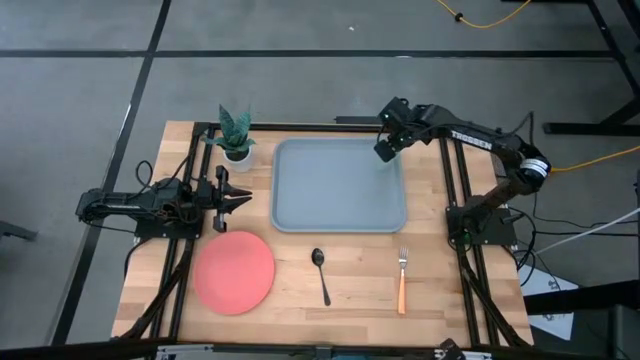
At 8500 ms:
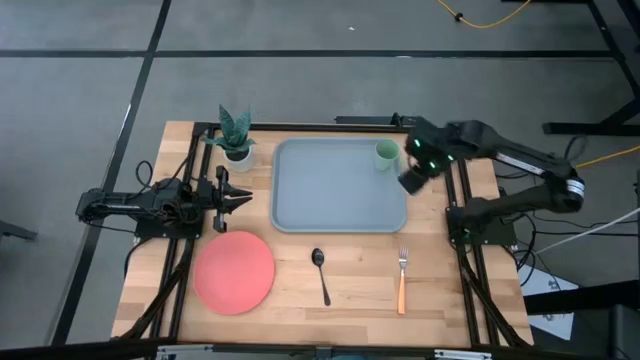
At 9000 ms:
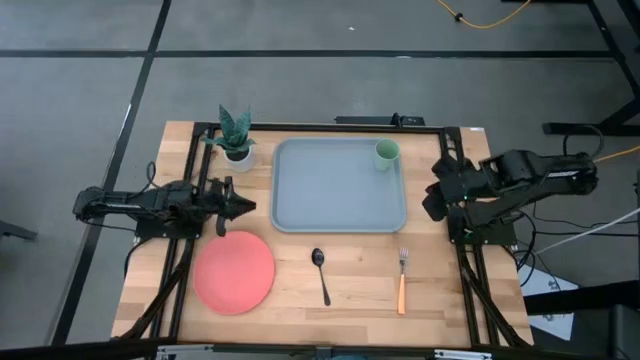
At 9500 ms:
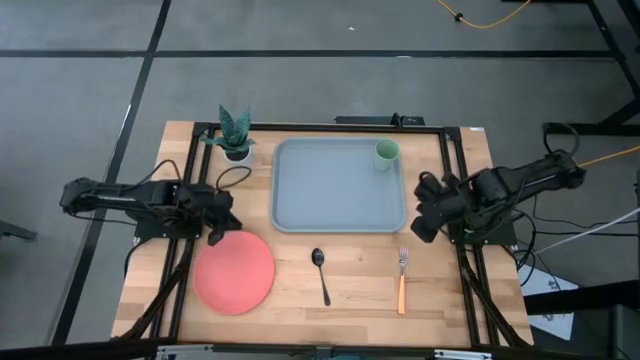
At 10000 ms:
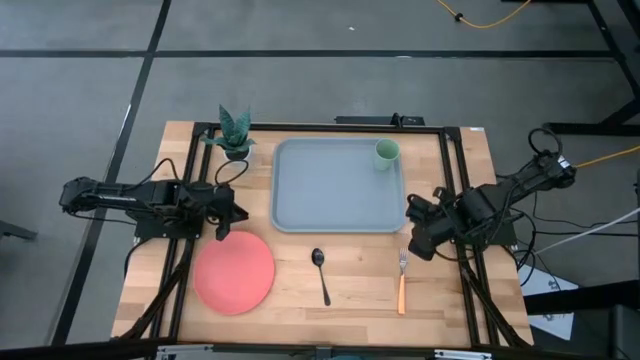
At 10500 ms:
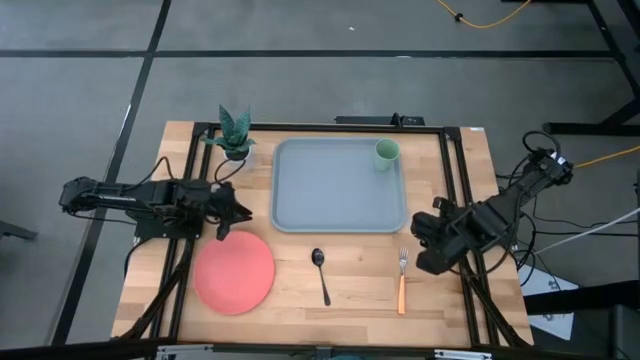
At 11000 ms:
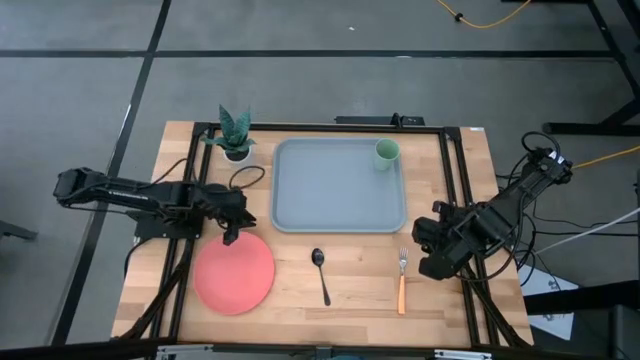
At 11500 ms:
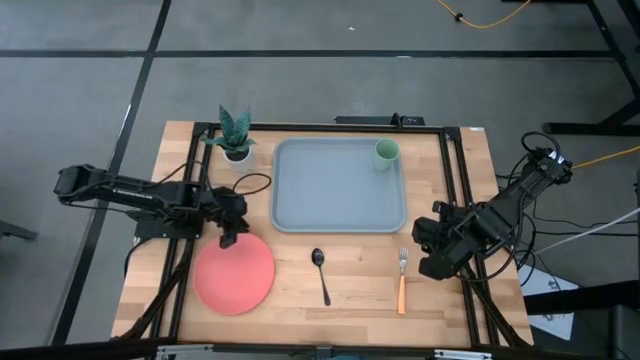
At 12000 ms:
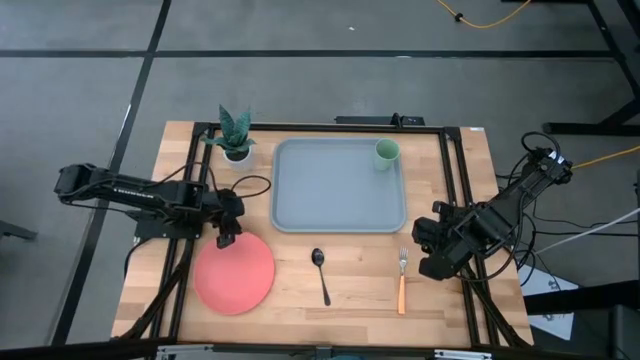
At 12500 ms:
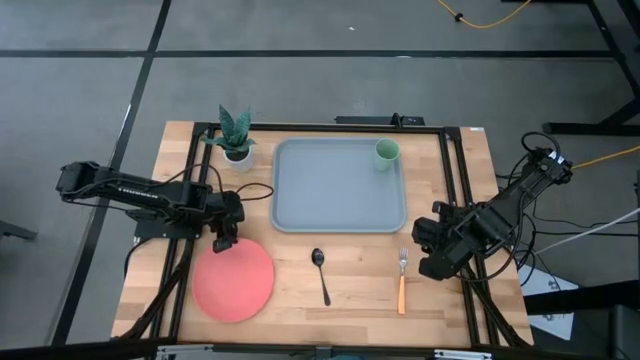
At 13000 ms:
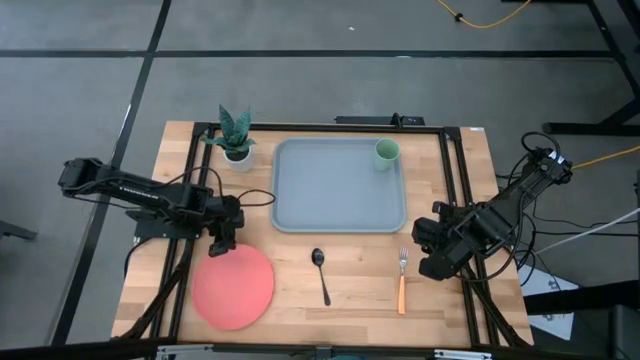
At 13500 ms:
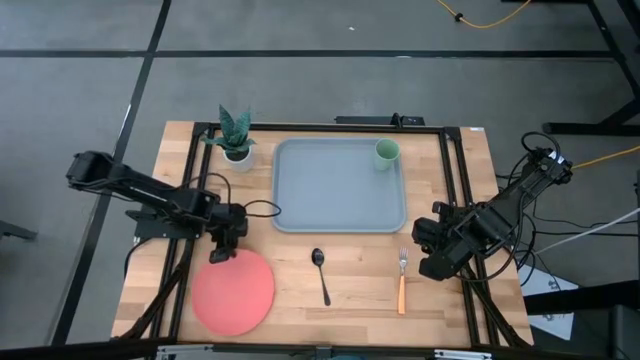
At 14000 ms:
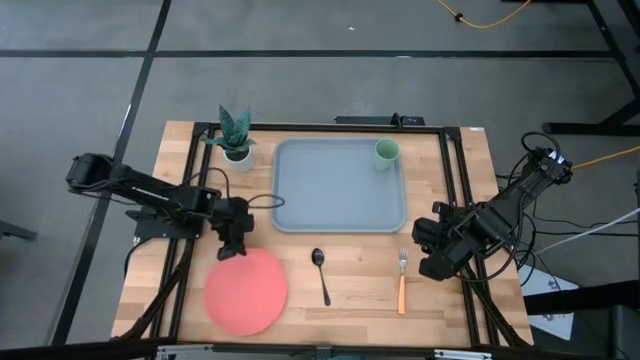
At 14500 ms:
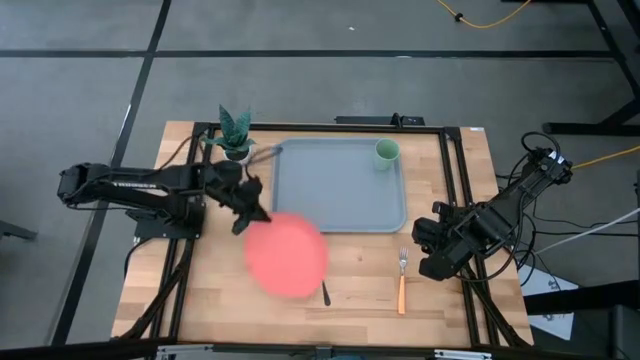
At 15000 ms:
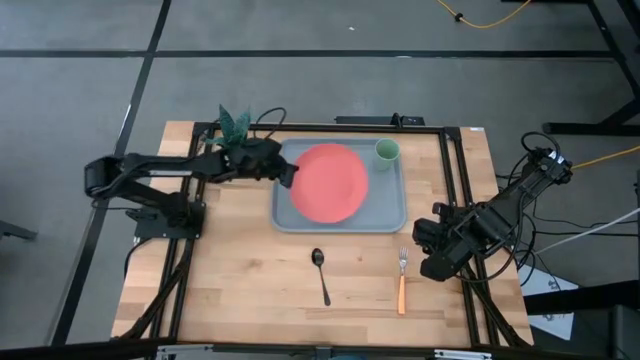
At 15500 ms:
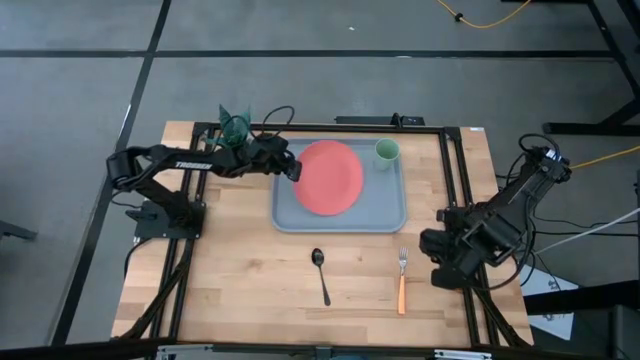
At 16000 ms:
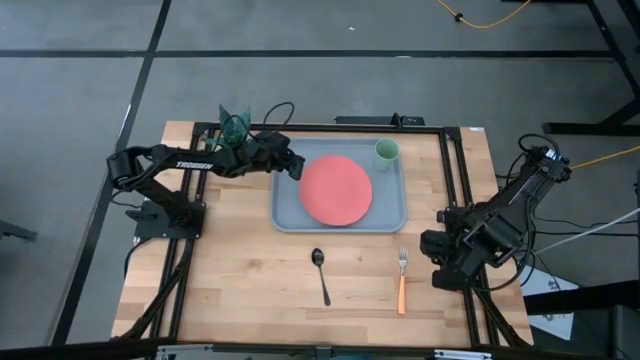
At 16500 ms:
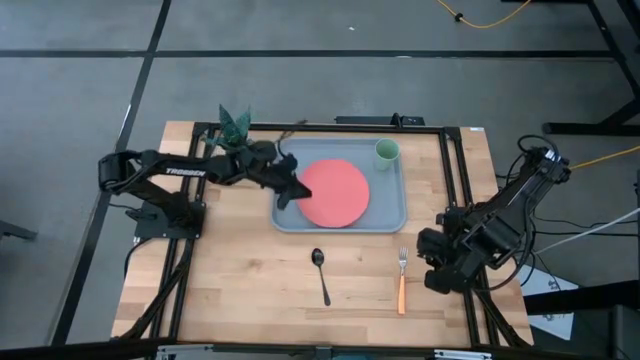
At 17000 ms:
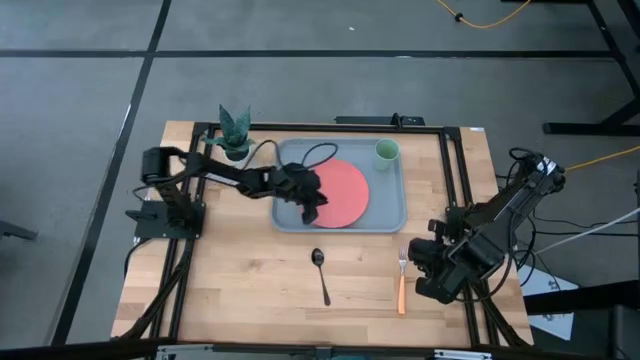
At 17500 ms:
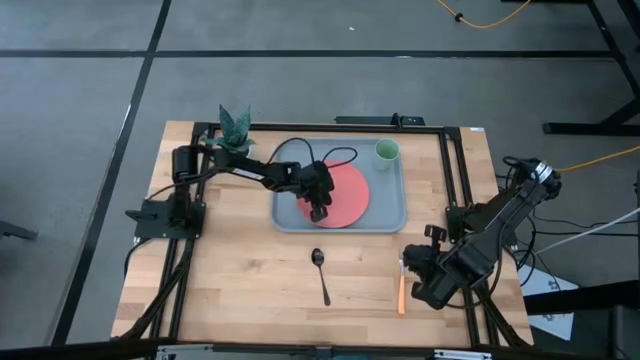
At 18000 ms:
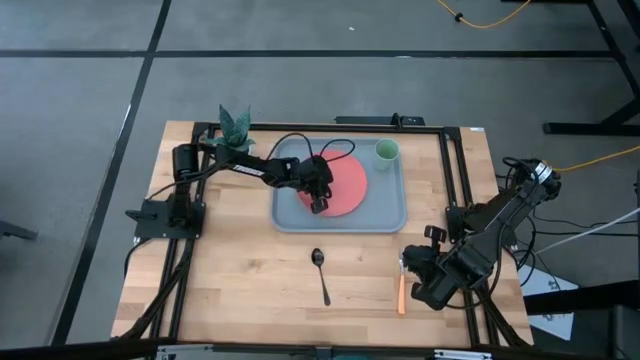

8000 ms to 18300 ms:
Task: Pick and place plate/cup/fork/spoon on tray
Put the pink plate to the center of the blue tray

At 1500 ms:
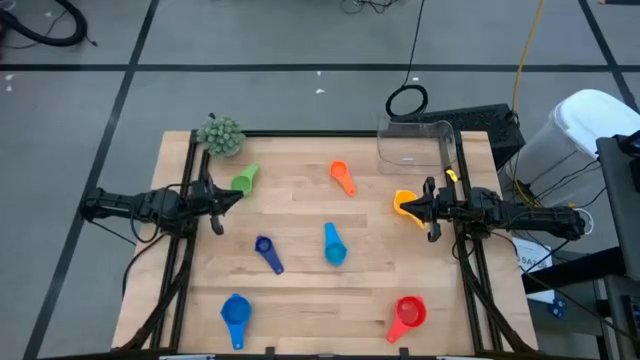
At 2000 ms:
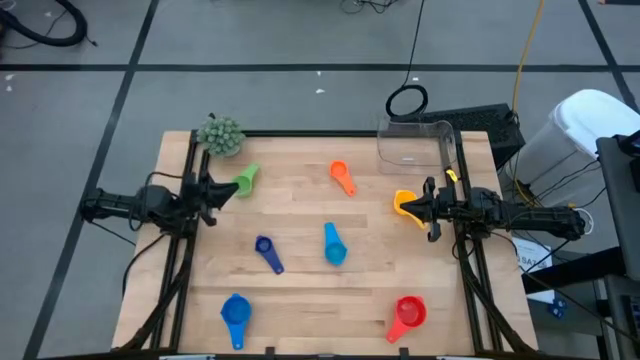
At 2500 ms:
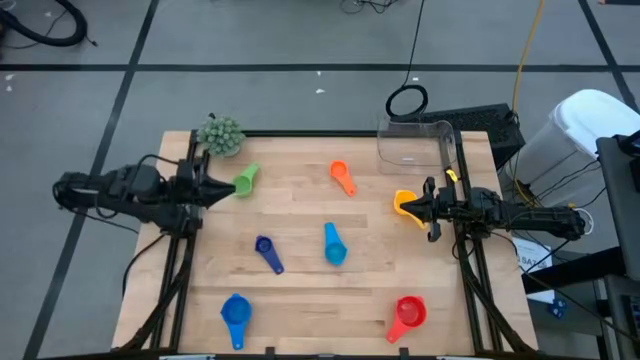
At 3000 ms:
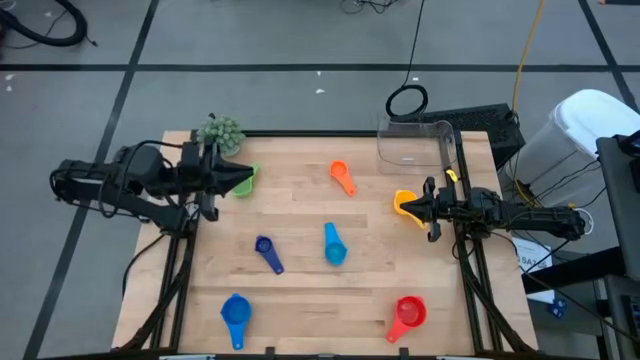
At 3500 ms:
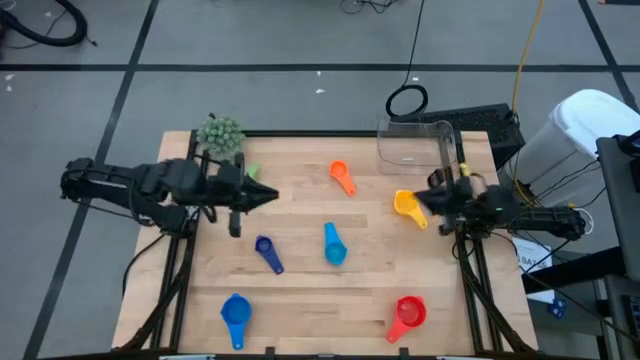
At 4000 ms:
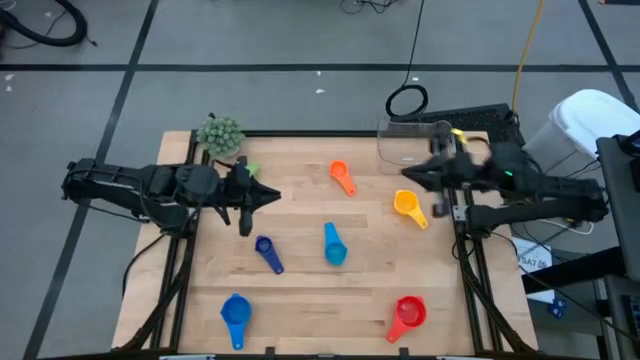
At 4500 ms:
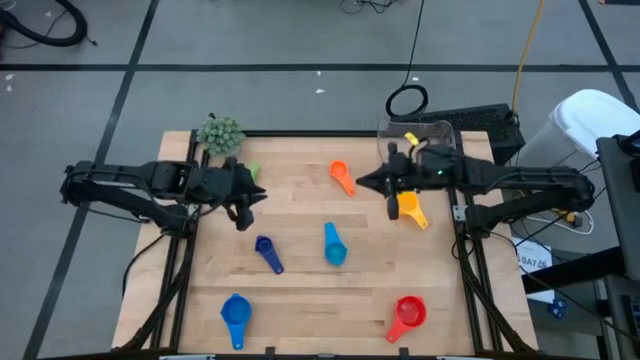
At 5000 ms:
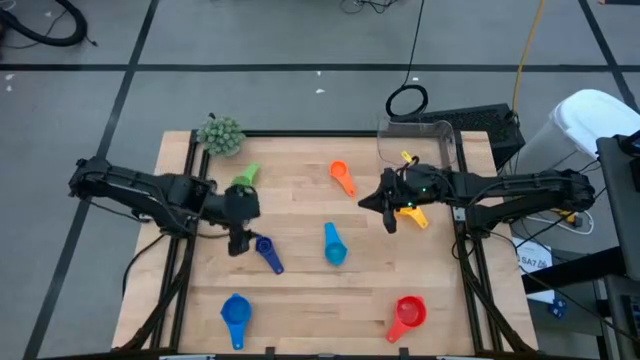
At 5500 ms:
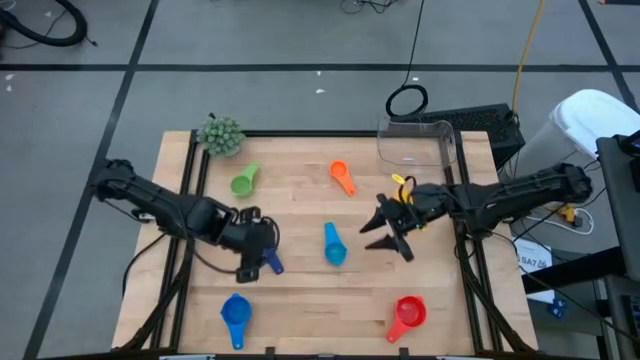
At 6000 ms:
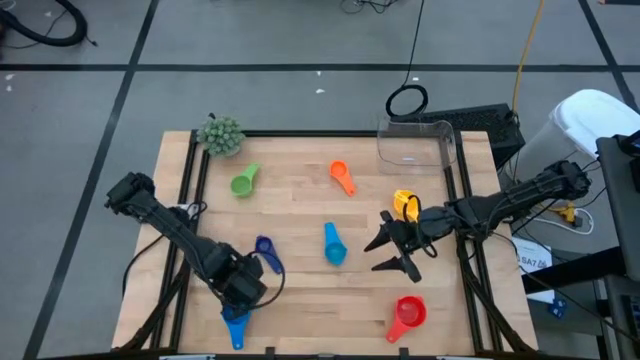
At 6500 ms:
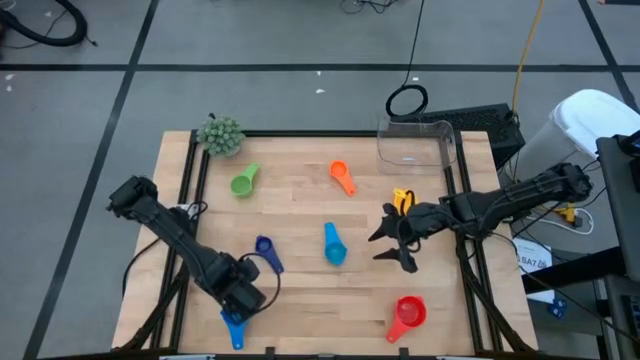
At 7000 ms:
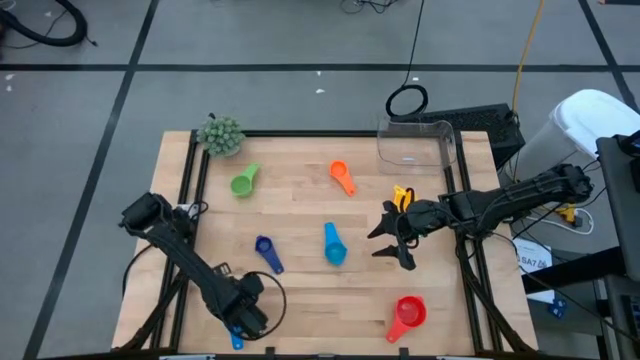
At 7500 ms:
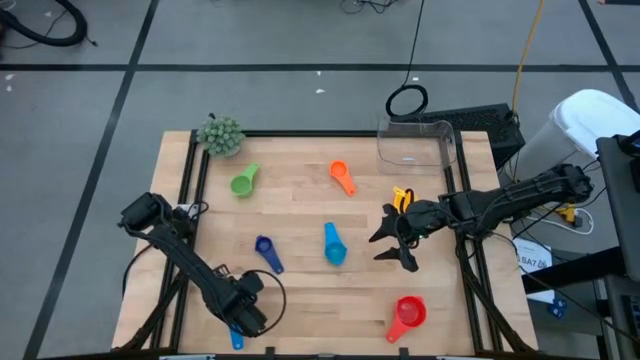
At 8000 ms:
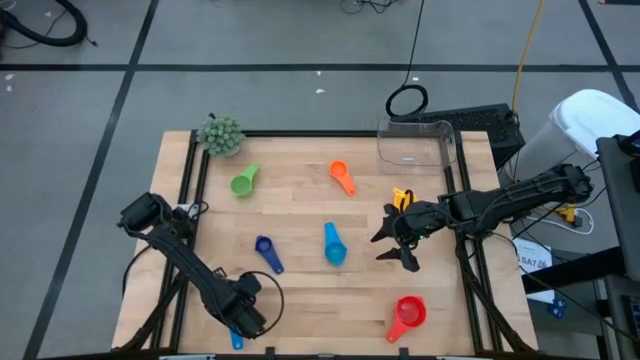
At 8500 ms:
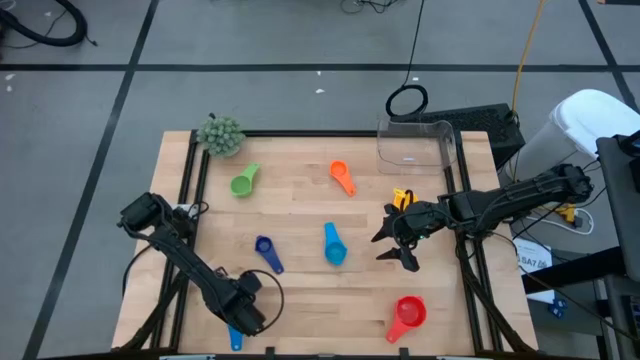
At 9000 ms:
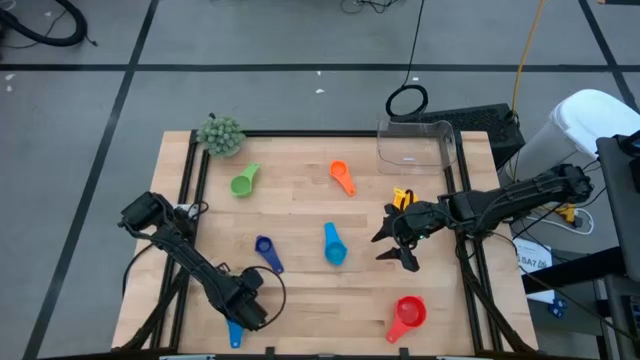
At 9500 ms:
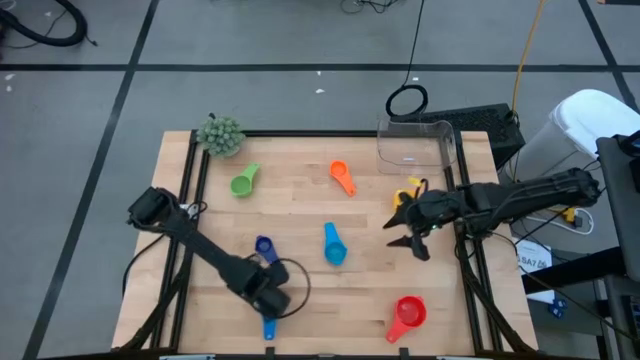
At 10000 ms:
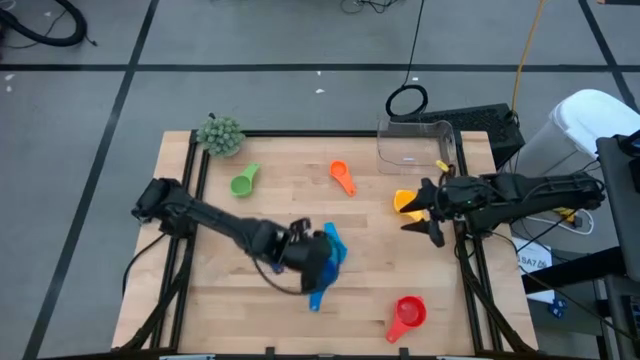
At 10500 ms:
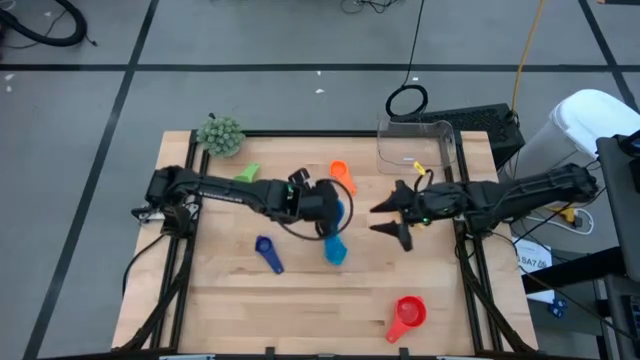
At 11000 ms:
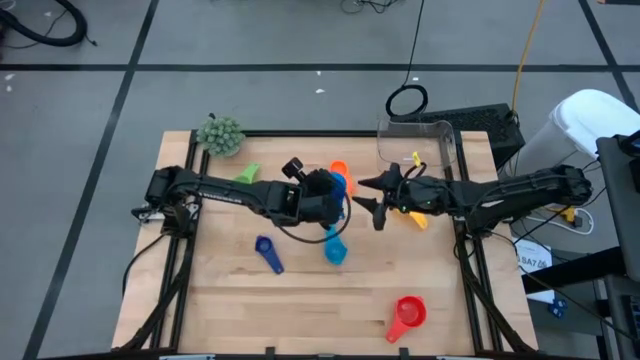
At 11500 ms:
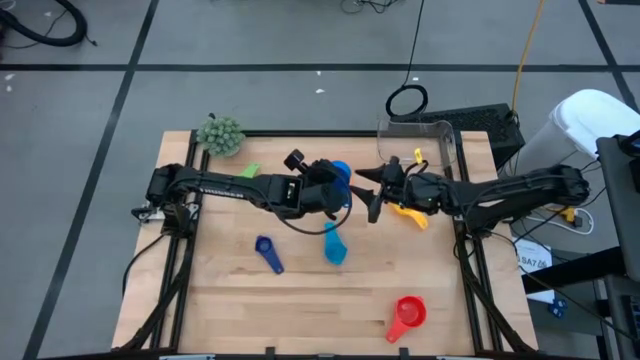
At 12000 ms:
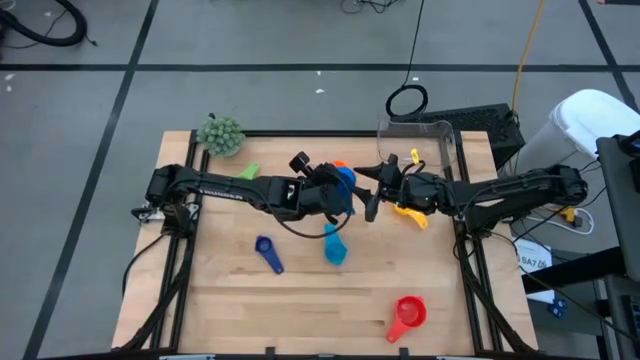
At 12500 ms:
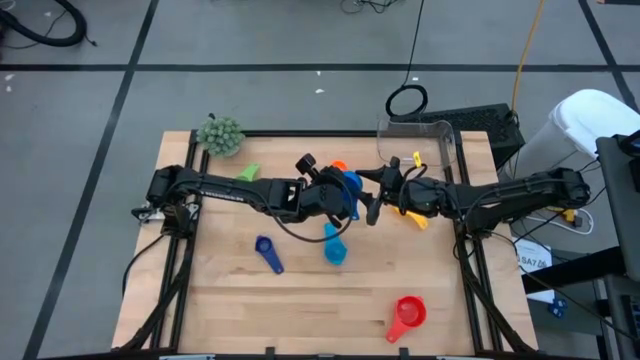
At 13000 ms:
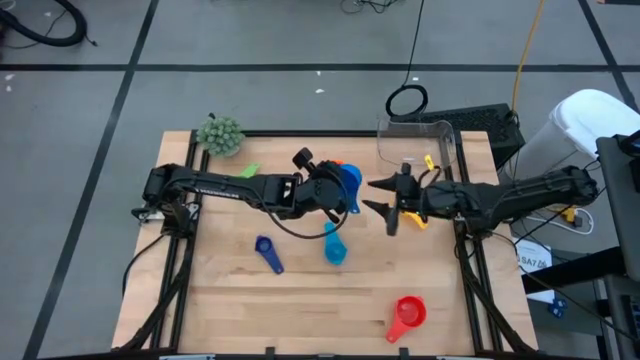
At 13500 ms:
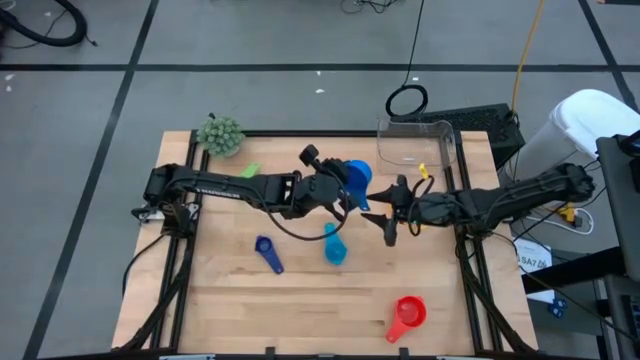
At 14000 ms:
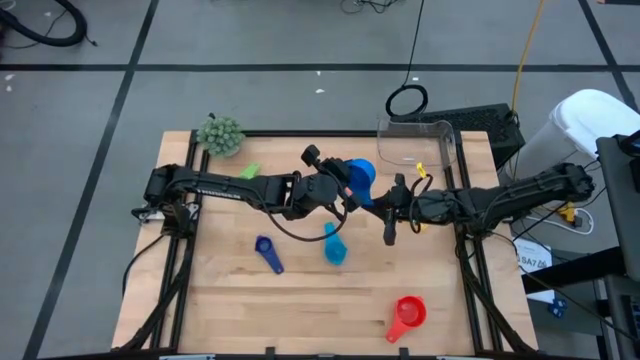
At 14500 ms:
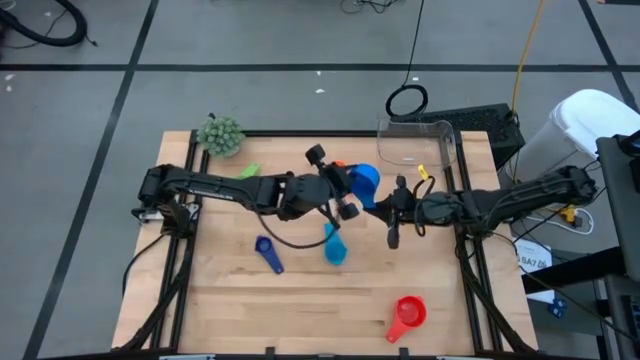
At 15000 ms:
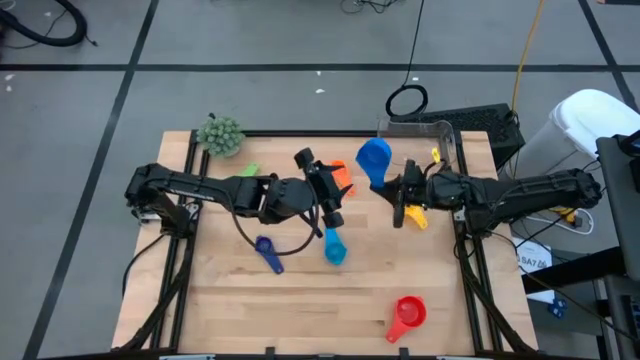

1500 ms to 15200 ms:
Task: Nest measuring cups in basket
Stack the blue measuring cup on top of the red measuring cup
